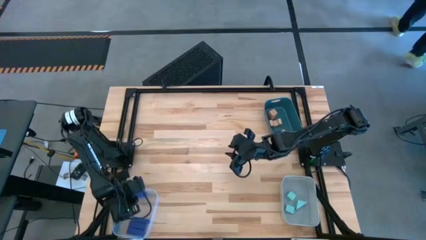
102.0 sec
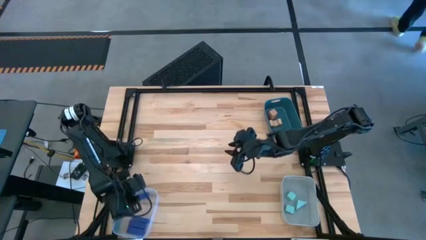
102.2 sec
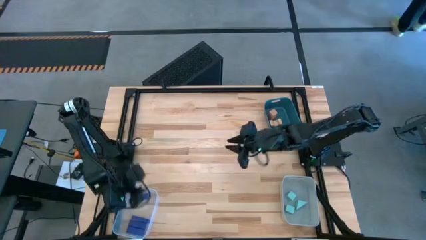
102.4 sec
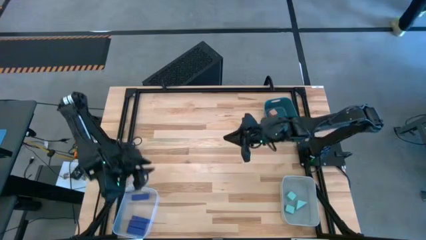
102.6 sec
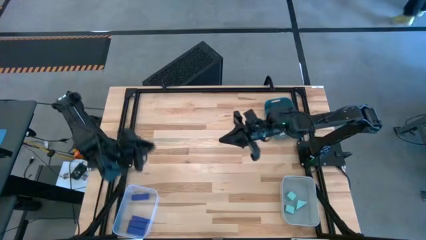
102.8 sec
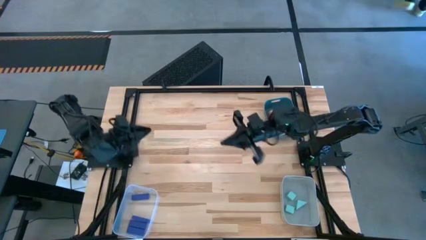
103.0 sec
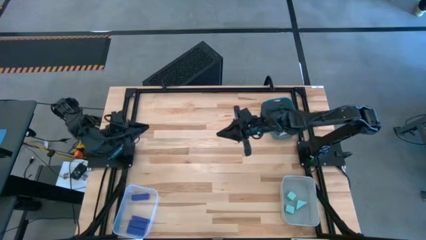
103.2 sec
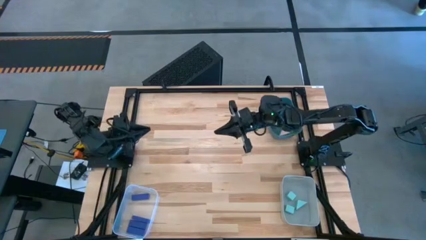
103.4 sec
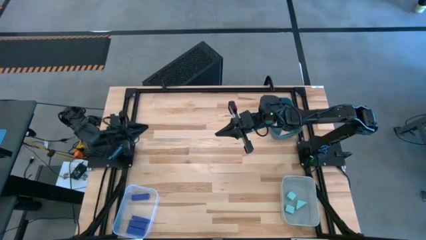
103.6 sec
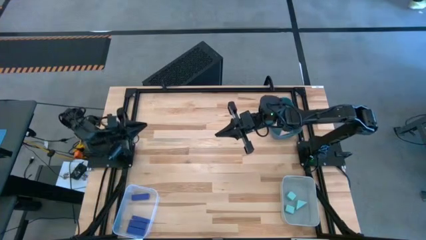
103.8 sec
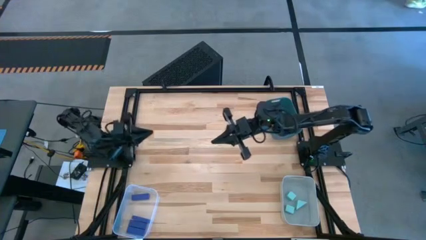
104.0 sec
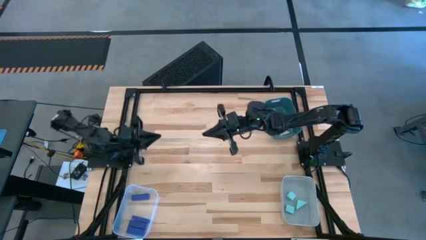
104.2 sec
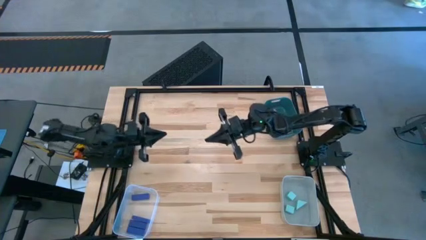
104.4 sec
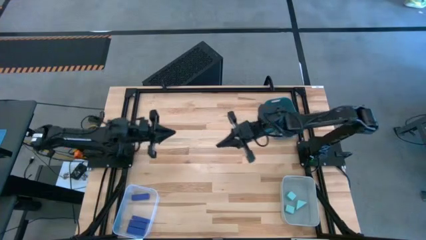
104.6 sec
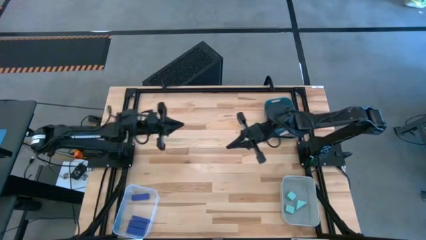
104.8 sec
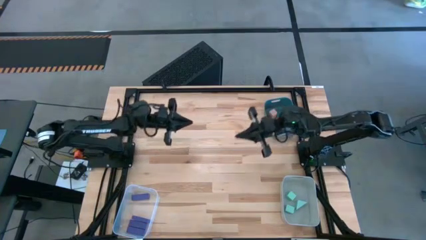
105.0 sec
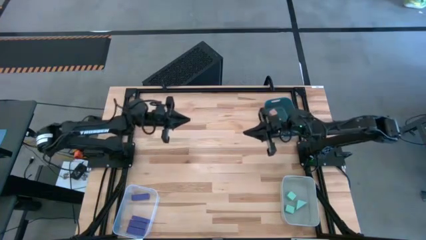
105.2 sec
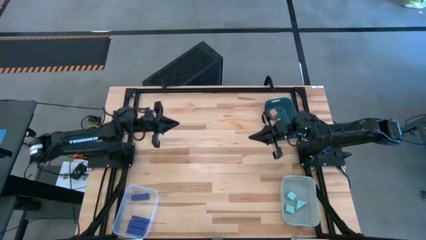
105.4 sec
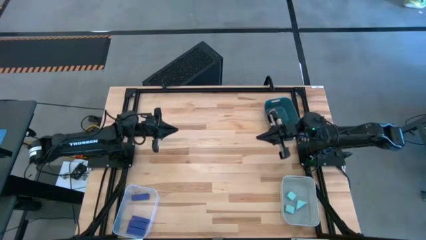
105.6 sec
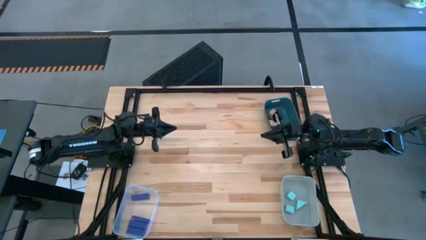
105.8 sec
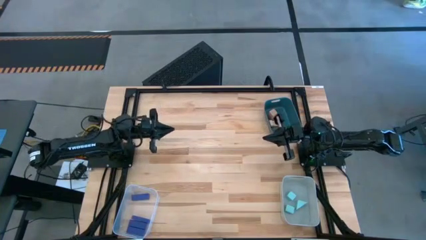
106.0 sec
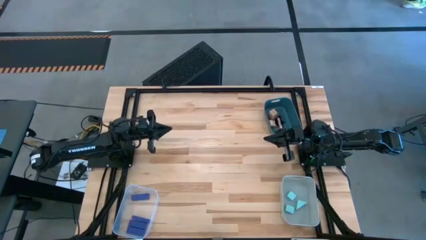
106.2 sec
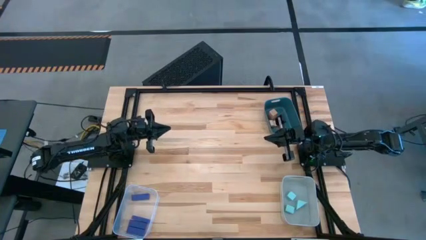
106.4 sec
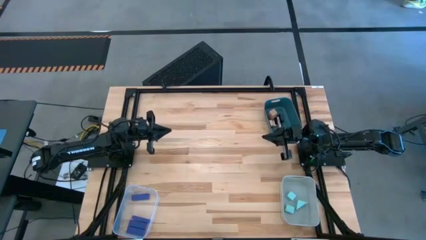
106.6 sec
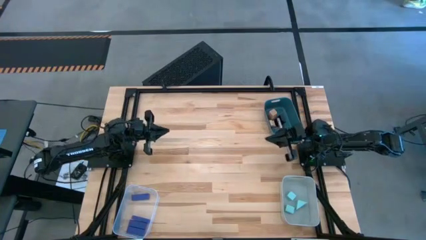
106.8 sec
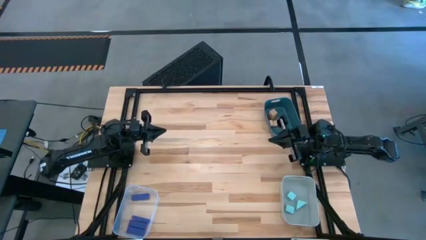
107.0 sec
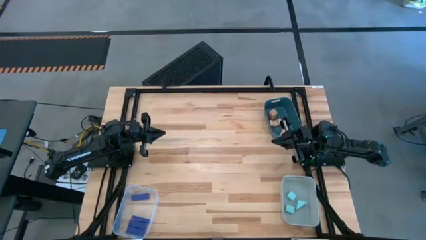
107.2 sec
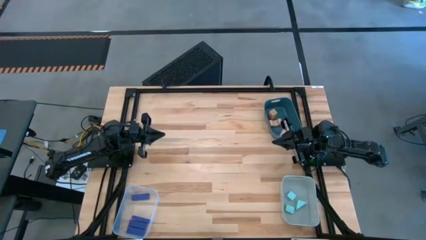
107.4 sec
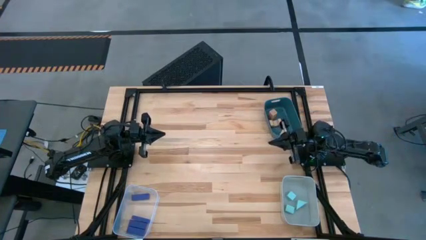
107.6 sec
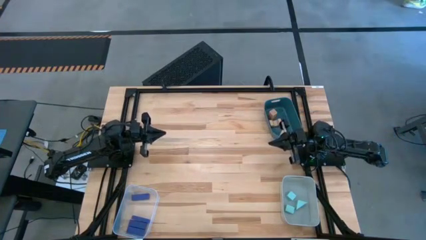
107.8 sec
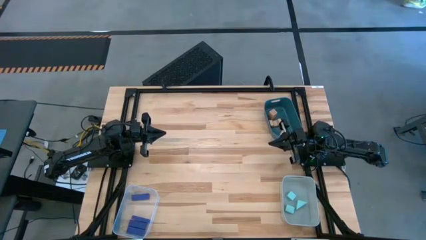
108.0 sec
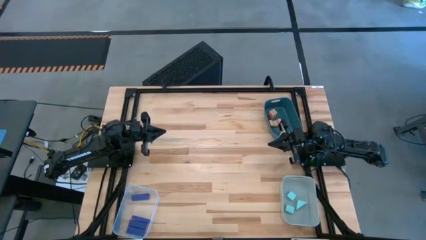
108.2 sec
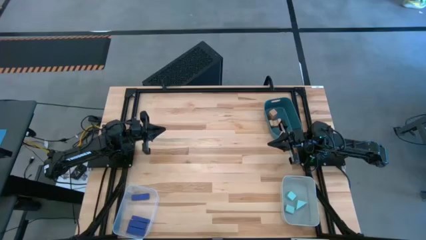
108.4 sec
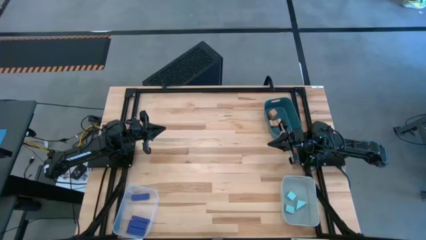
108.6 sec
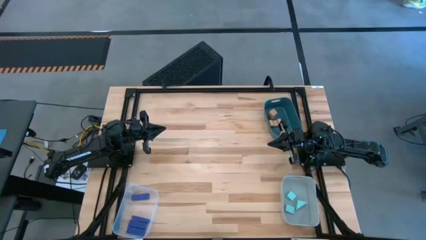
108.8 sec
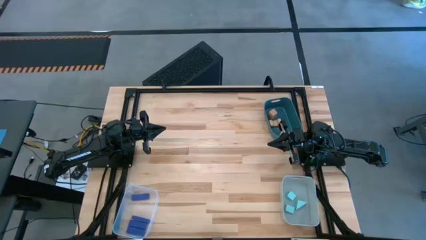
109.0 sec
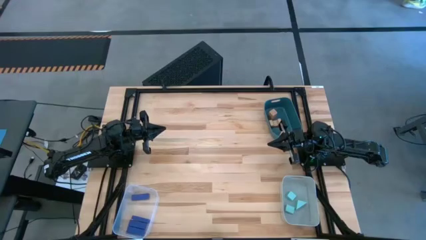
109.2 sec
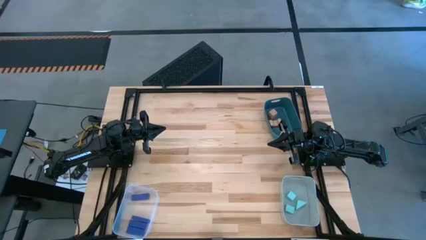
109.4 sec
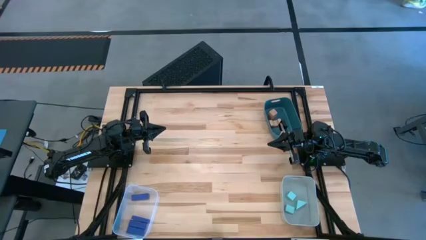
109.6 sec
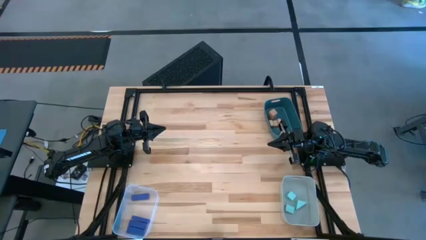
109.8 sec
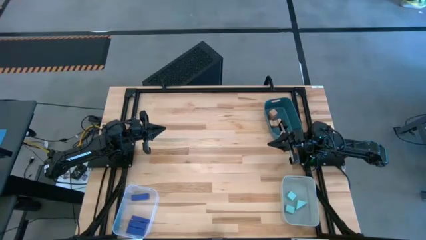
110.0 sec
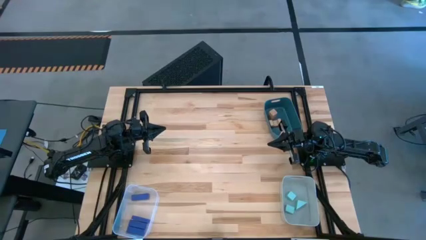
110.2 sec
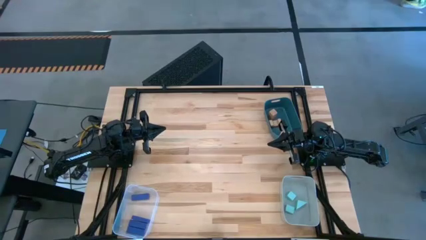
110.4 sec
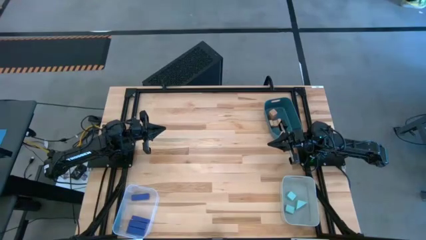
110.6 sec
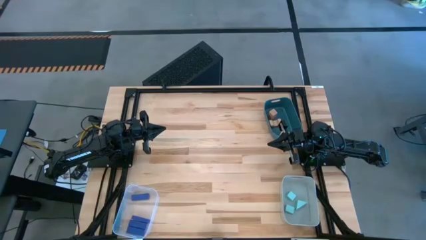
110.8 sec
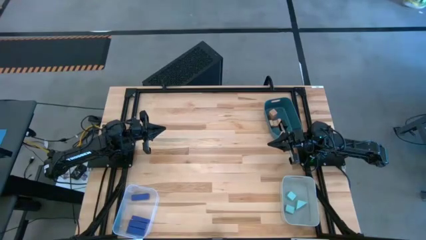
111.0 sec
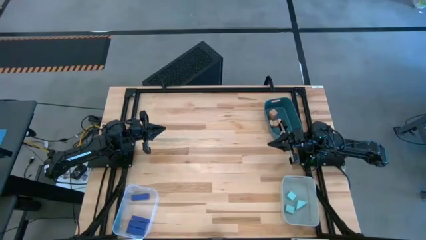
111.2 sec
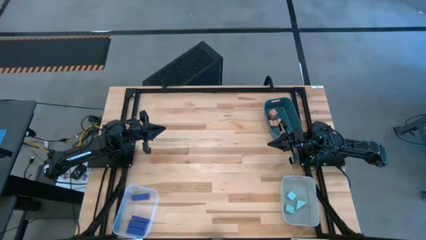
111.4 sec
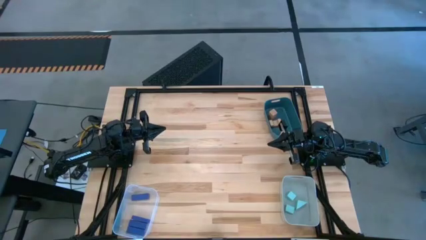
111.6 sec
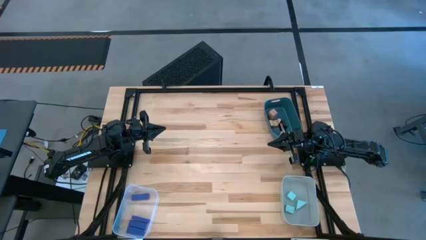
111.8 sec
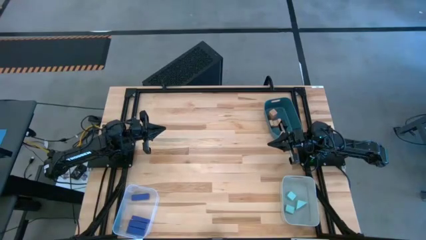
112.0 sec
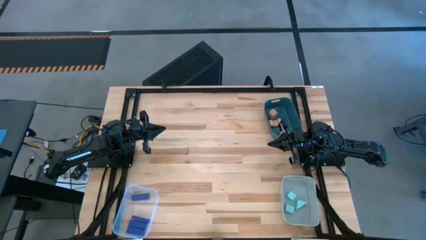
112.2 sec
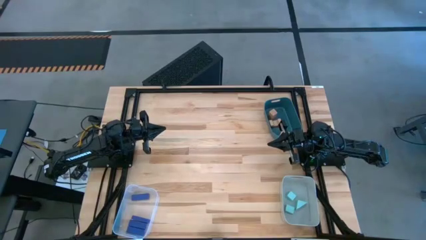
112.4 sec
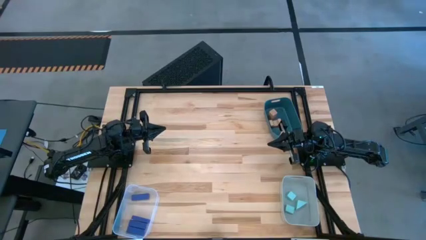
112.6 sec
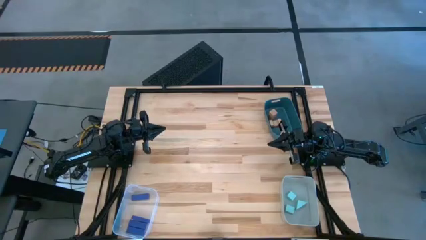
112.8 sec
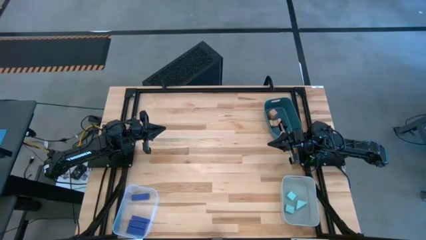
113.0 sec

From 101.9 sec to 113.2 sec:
Task: Sort & place blocks by color
Return to Home Position

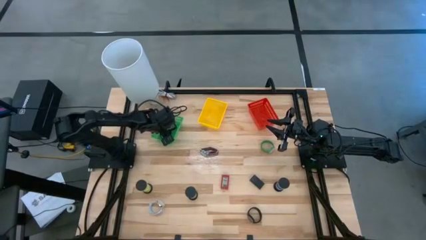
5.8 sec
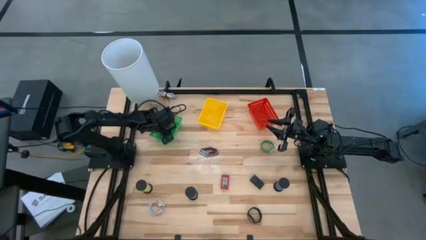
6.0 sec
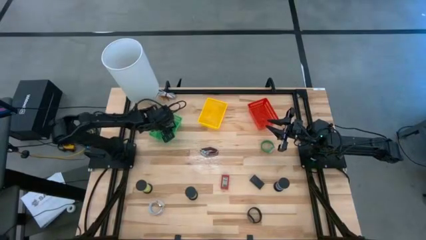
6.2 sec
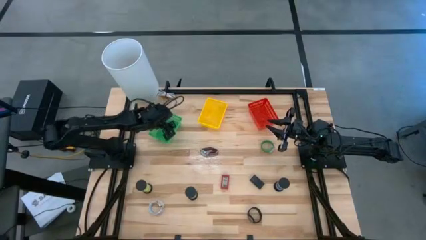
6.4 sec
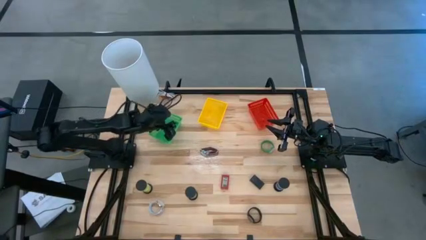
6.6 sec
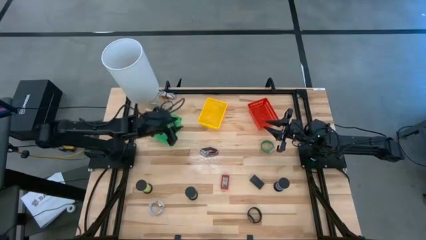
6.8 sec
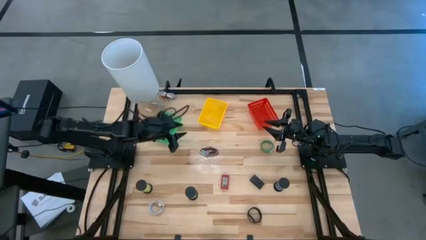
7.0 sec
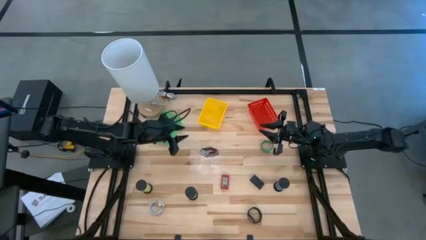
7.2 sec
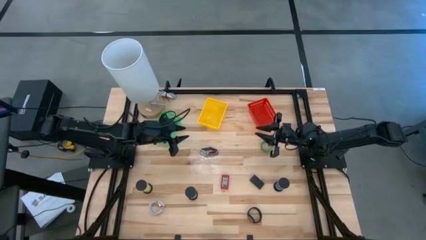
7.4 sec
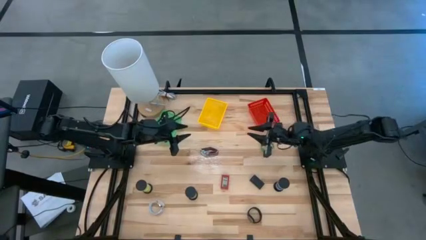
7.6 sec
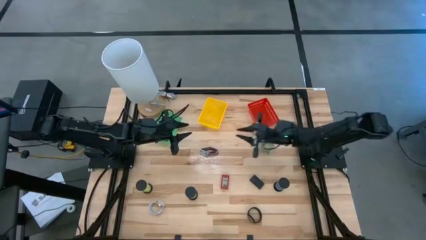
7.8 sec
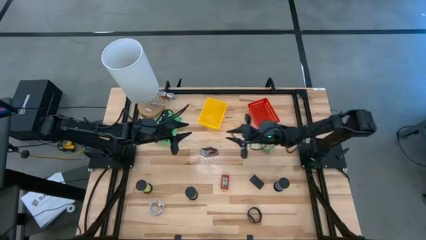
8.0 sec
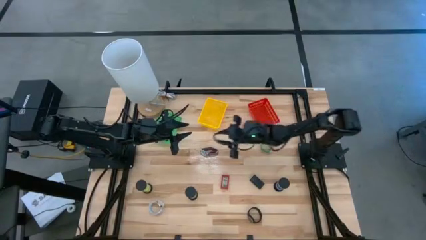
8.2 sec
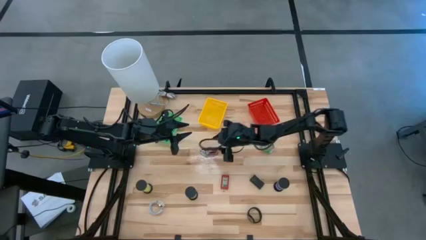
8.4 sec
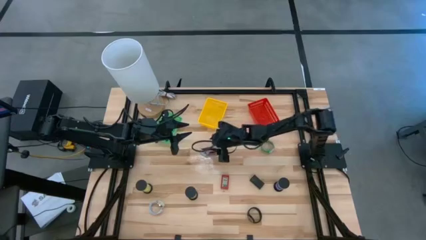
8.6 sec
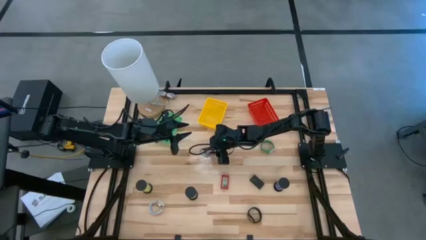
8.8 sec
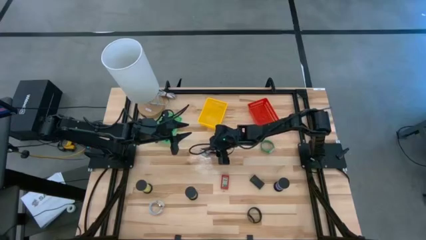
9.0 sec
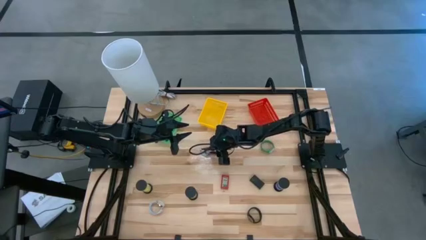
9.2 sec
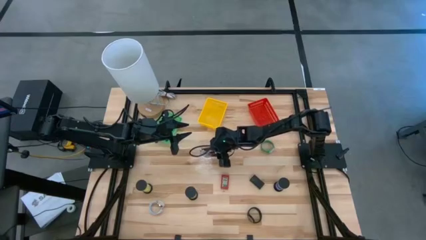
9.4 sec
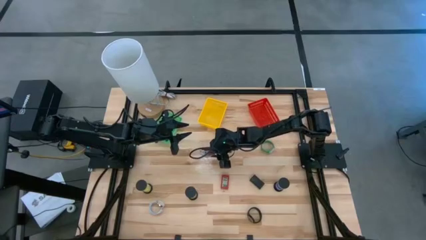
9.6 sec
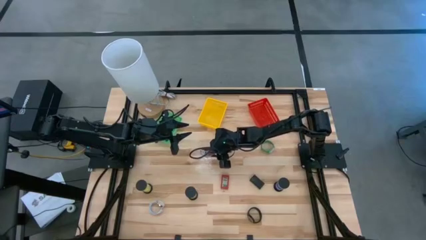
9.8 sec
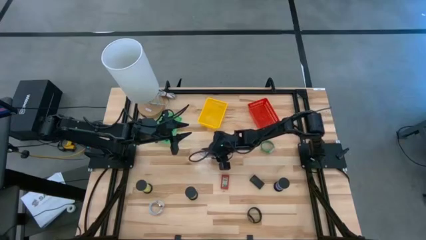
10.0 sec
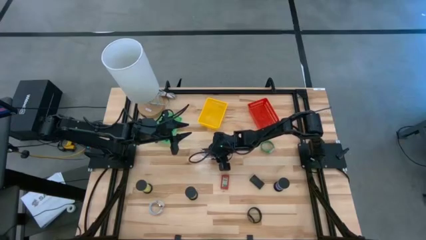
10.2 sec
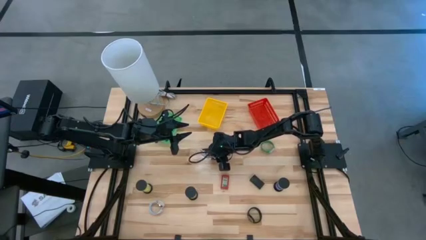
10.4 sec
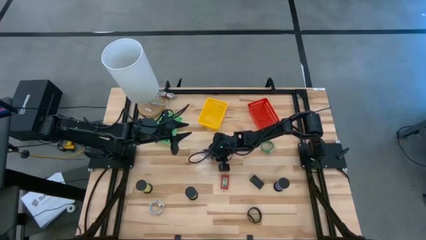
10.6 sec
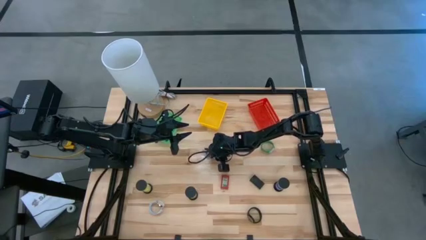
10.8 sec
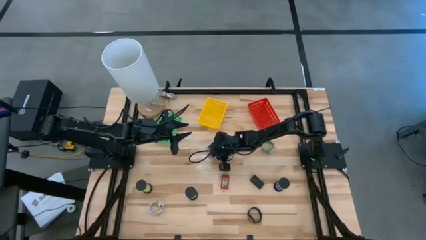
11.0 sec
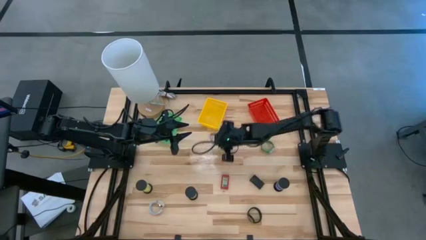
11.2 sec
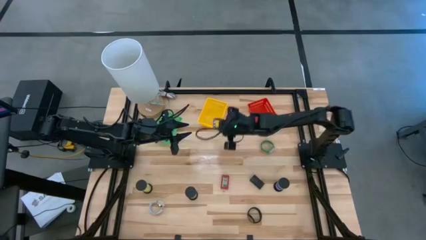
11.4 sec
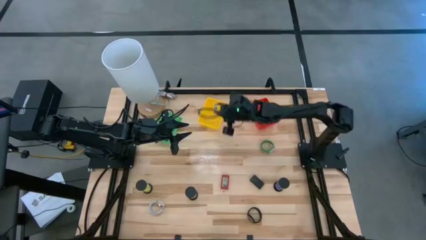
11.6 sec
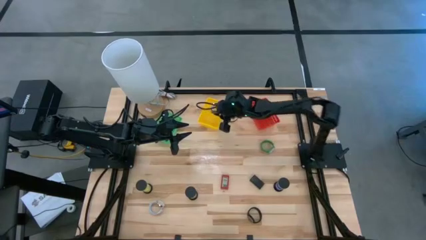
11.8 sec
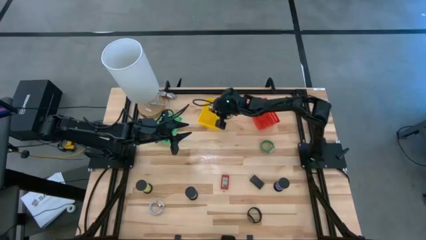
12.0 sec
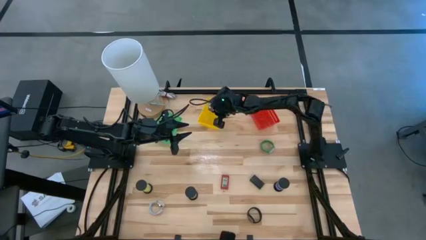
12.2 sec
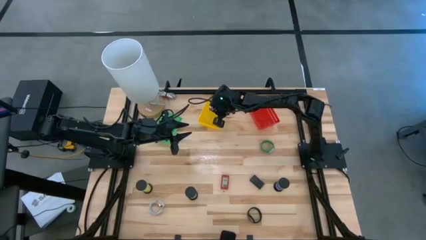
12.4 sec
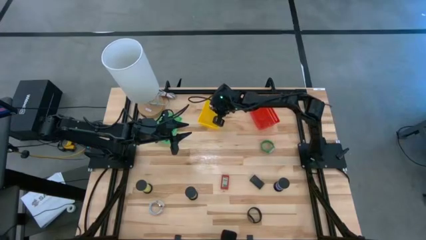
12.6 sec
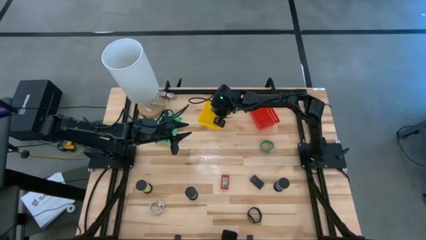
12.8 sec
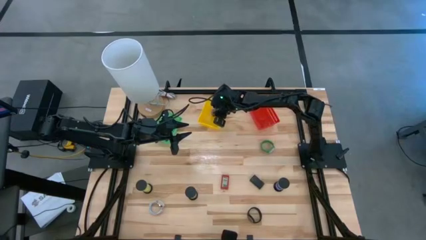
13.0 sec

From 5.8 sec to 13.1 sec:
Task: Pick & Place Office items
Put the brown watch into the yellow bin
